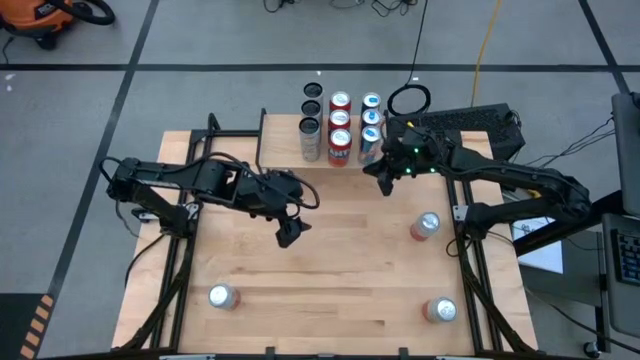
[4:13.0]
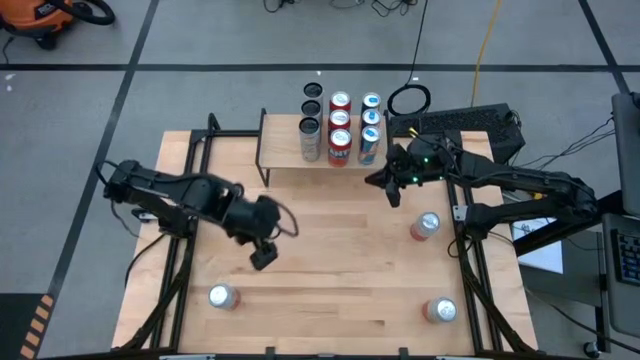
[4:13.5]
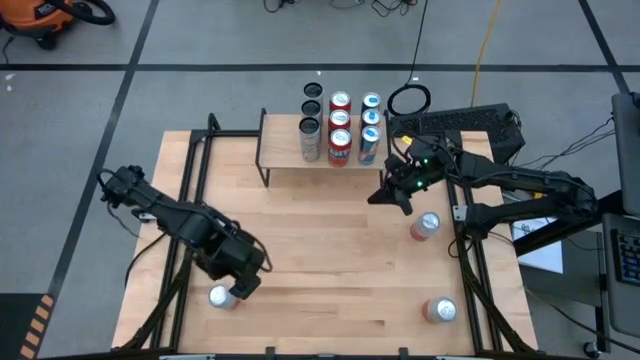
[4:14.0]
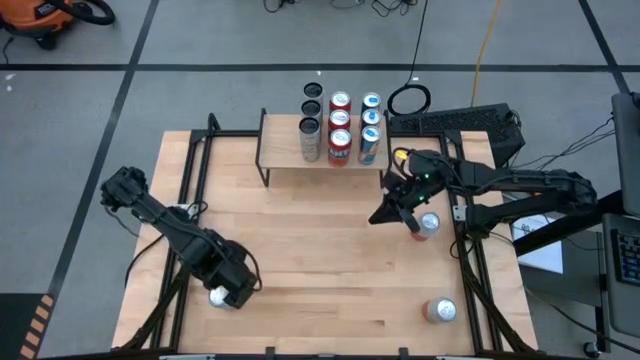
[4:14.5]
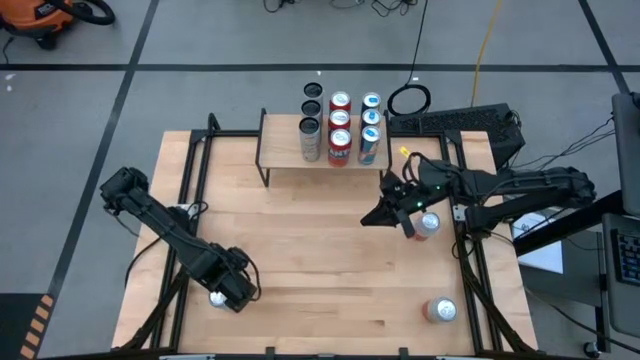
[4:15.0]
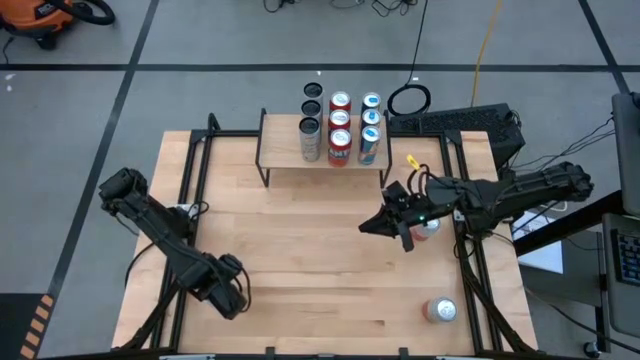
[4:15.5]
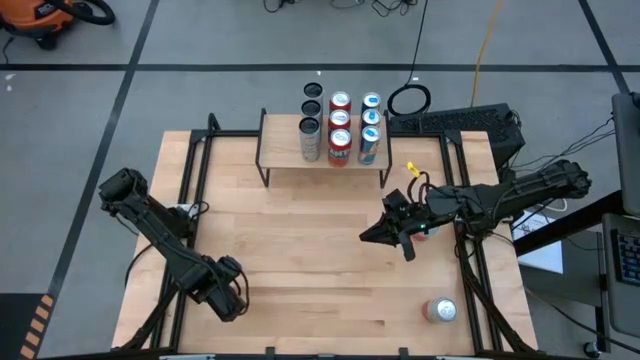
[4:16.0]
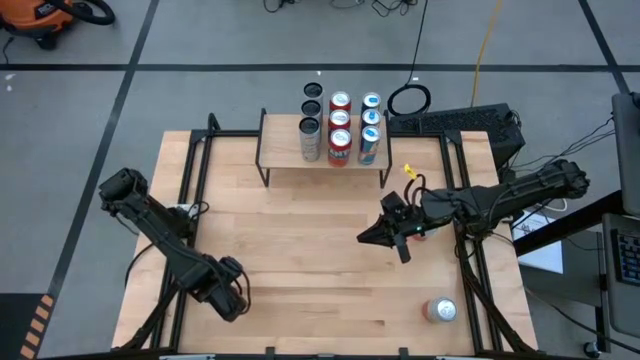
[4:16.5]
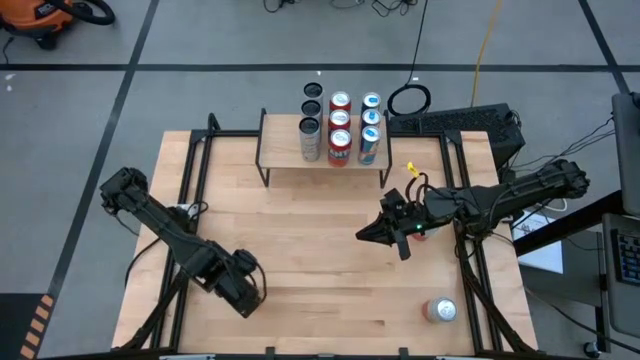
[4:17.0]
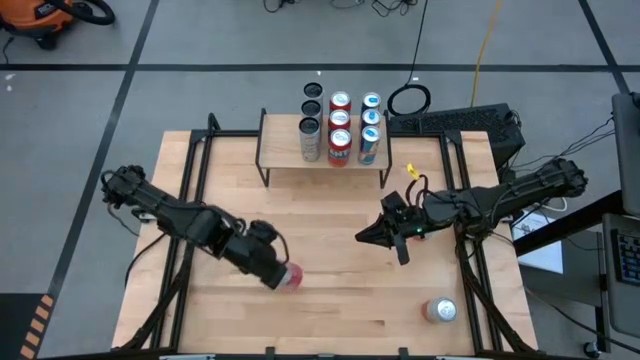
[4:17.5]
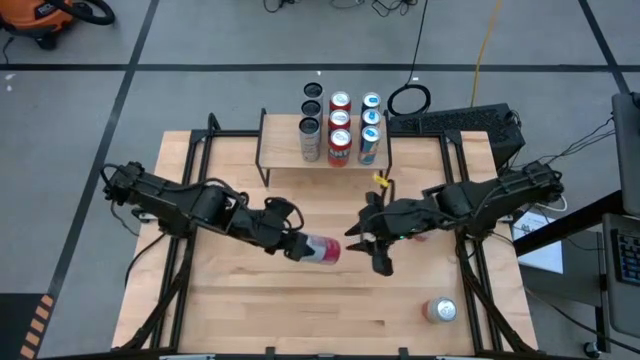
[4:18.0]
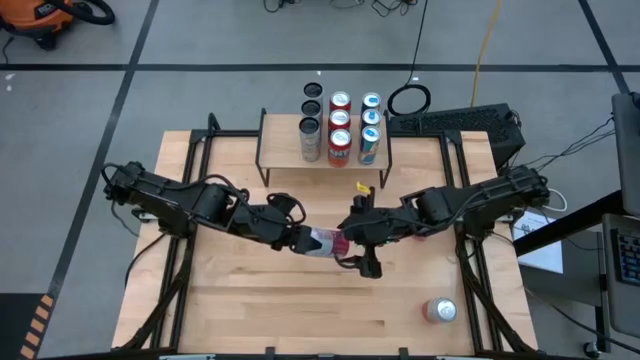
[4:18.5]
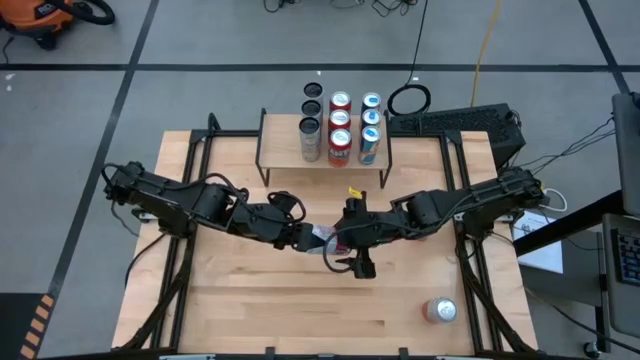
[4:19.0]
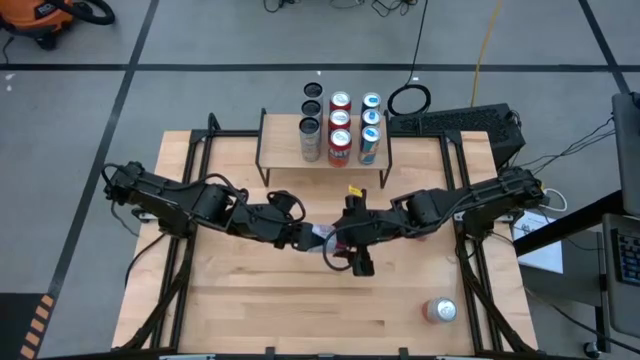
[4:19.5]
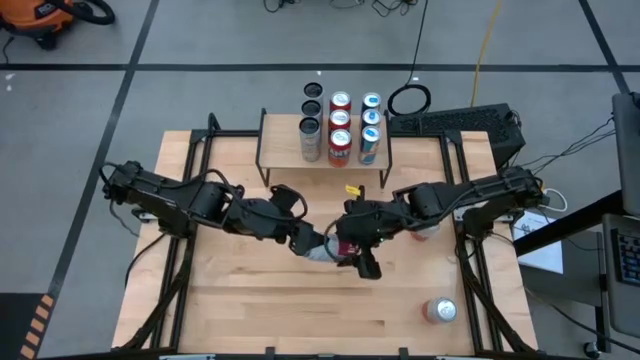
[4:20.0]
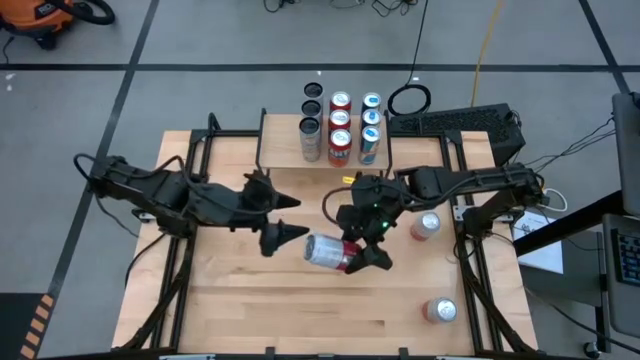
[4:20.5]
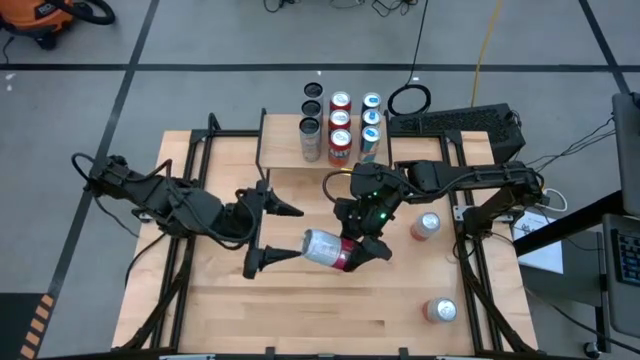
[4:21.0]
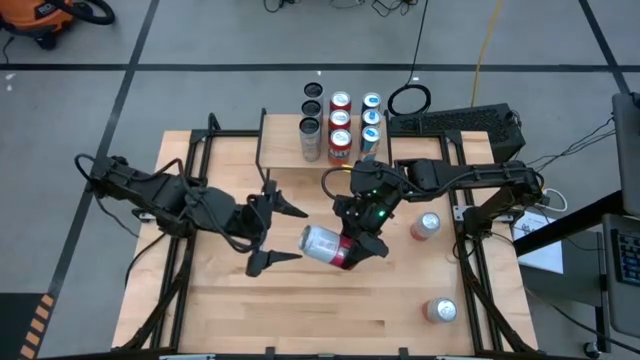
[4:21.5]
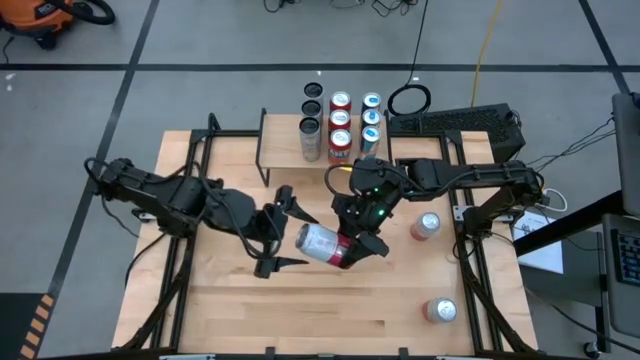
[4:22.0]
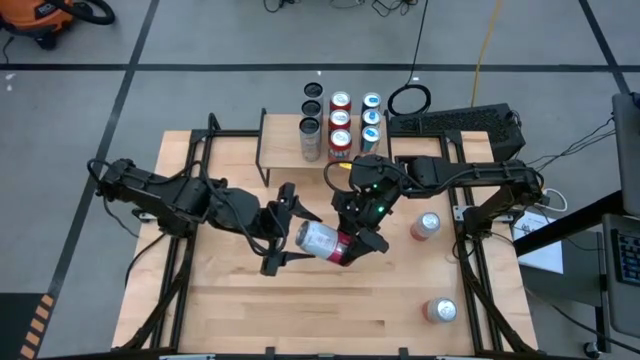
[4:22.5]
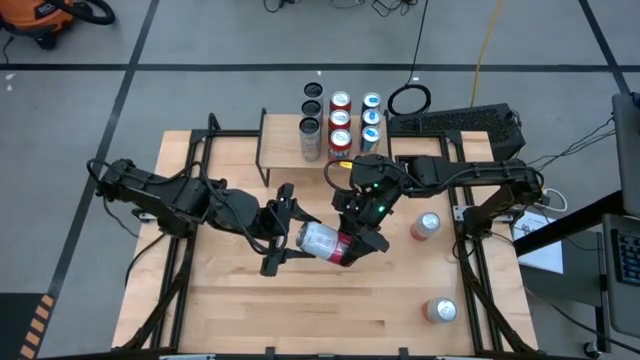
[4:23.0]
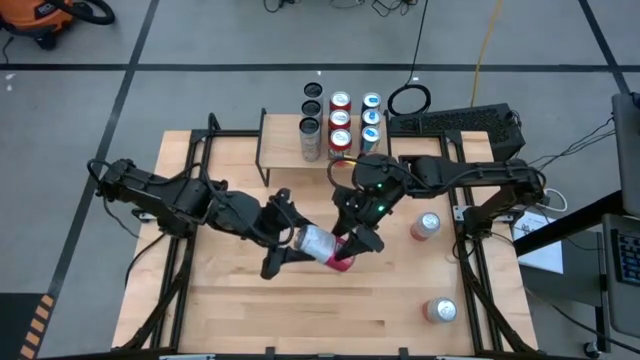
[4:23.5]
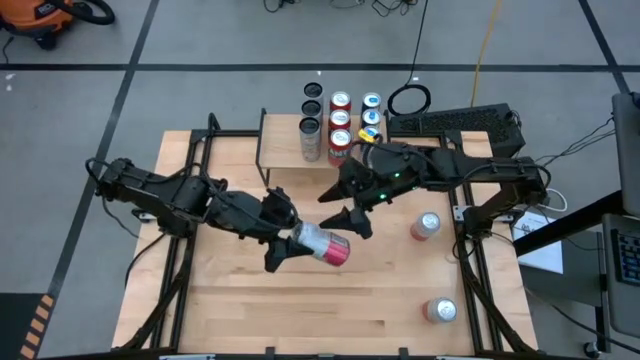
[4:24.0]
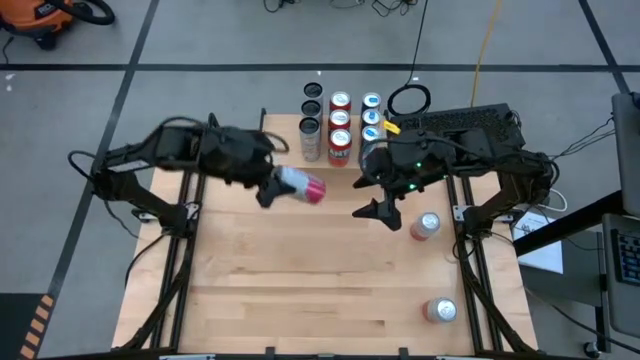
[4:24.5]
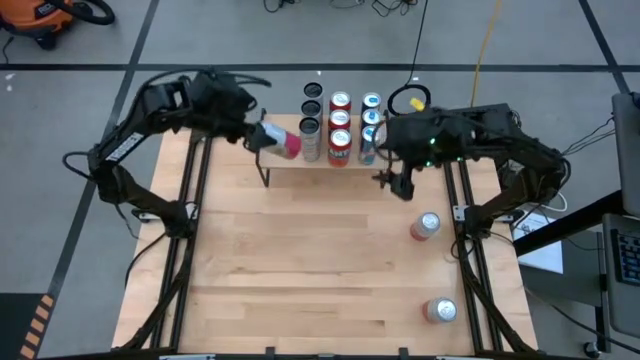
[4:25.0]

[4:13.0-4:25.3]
Task: Place canned beverage on shelf
Put the left pink and white soda can on the shelf
